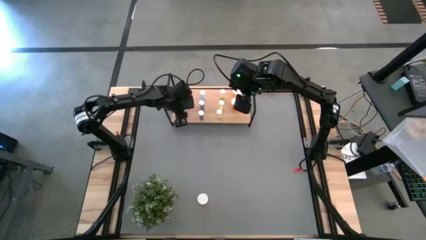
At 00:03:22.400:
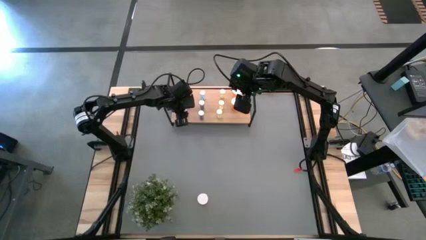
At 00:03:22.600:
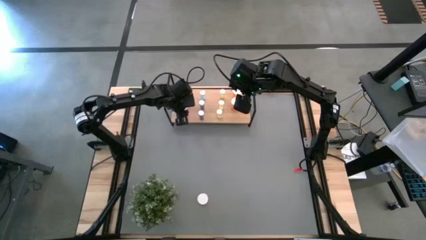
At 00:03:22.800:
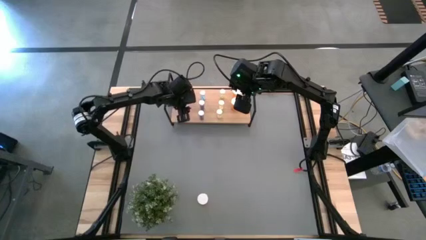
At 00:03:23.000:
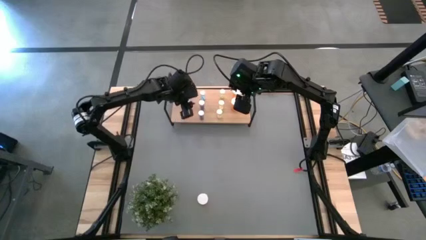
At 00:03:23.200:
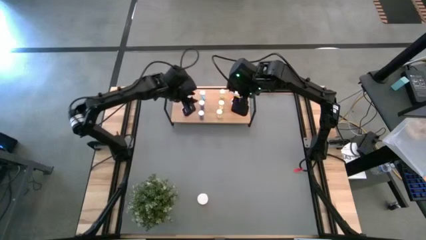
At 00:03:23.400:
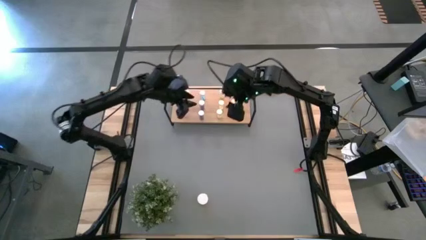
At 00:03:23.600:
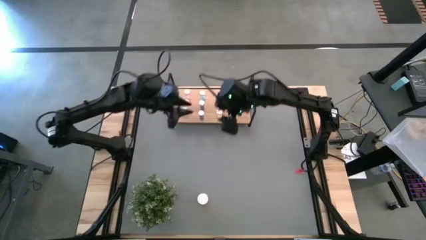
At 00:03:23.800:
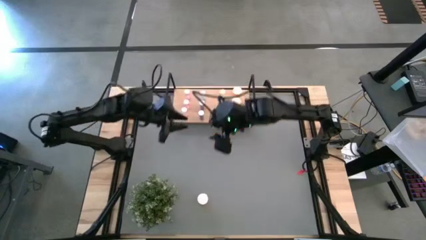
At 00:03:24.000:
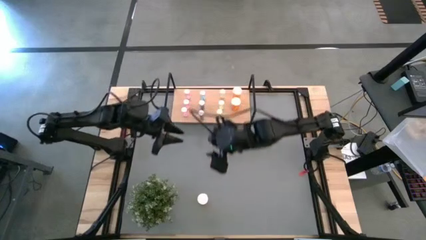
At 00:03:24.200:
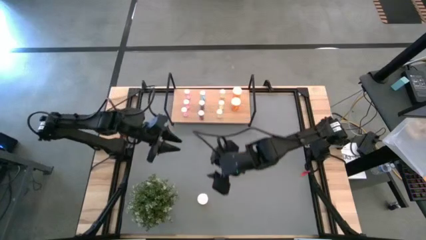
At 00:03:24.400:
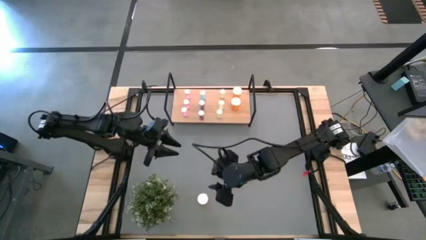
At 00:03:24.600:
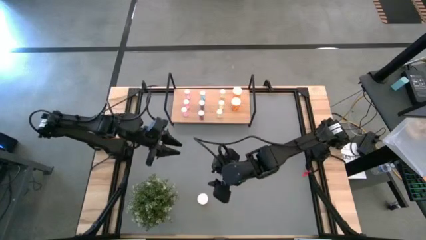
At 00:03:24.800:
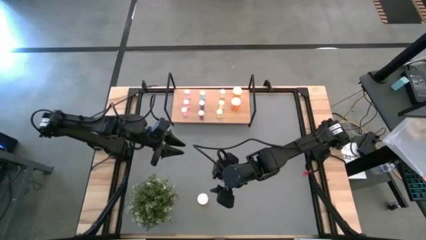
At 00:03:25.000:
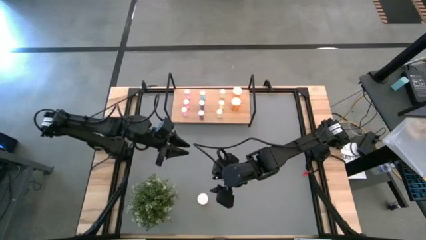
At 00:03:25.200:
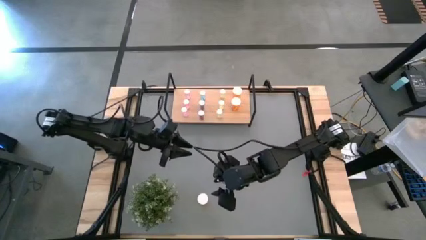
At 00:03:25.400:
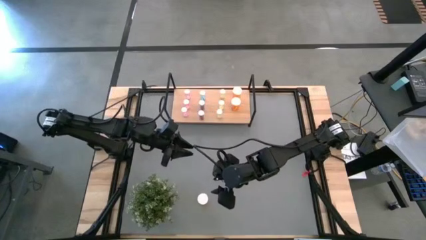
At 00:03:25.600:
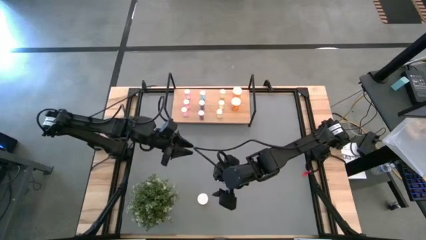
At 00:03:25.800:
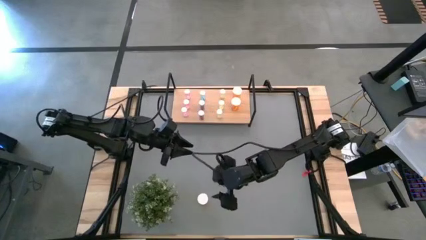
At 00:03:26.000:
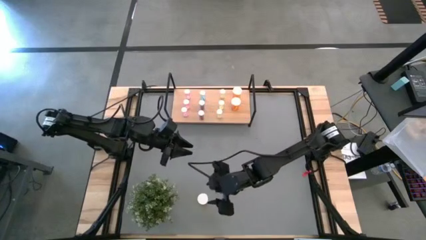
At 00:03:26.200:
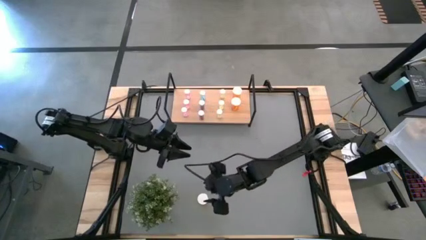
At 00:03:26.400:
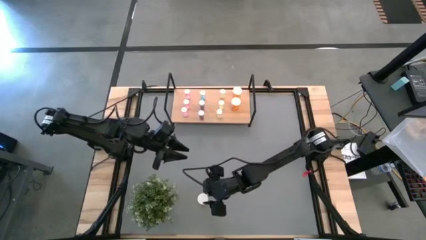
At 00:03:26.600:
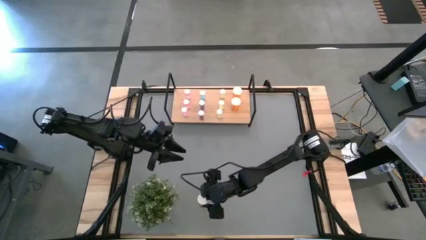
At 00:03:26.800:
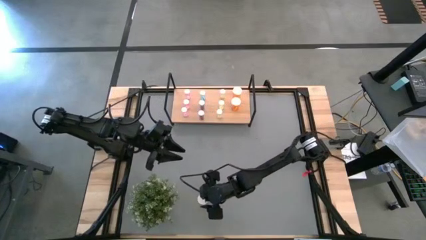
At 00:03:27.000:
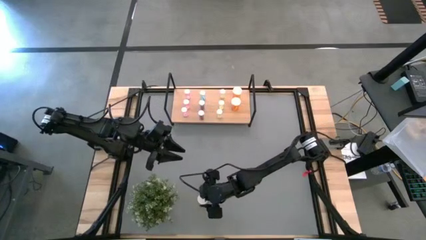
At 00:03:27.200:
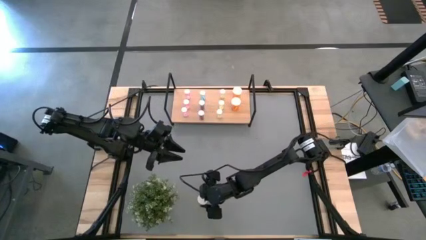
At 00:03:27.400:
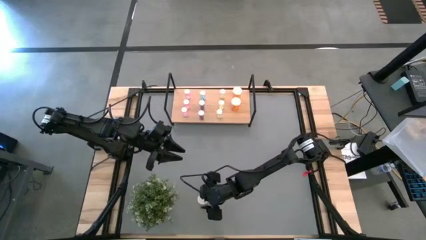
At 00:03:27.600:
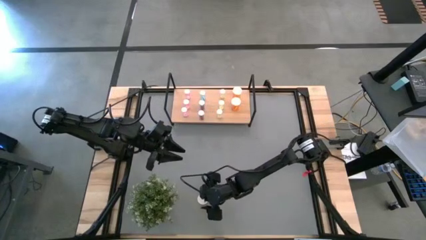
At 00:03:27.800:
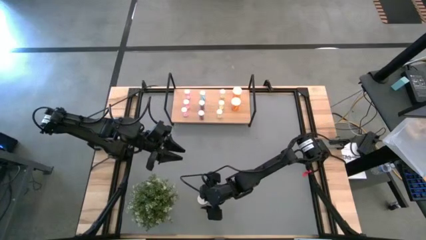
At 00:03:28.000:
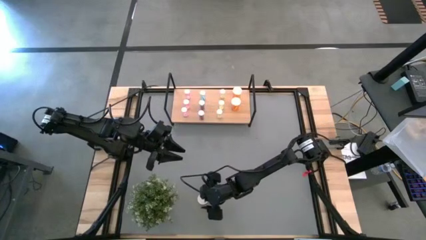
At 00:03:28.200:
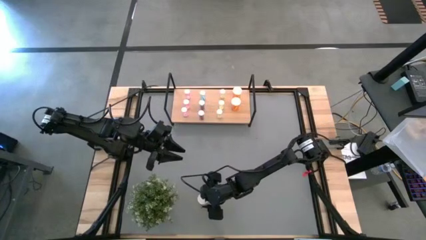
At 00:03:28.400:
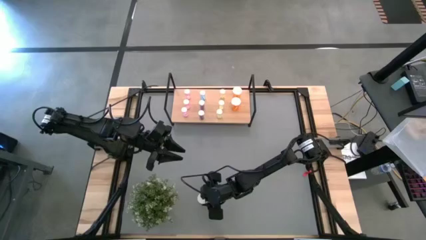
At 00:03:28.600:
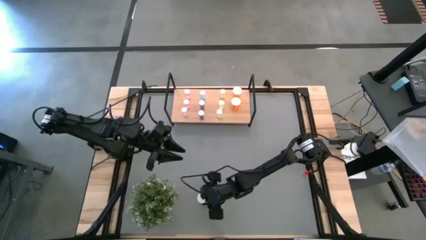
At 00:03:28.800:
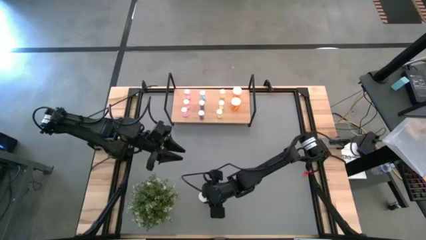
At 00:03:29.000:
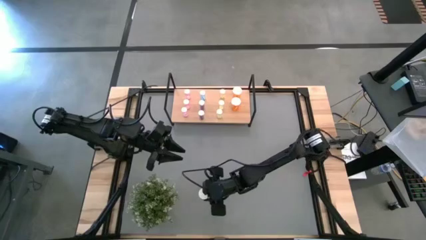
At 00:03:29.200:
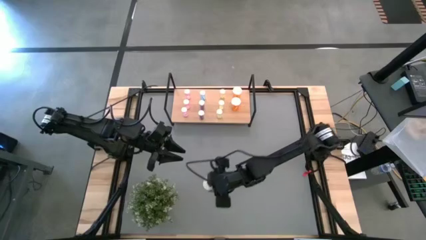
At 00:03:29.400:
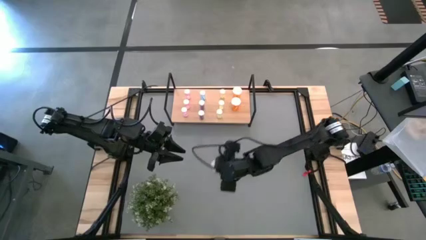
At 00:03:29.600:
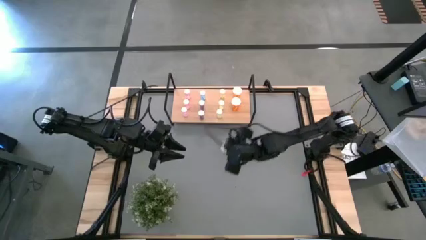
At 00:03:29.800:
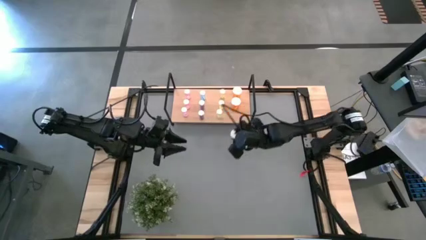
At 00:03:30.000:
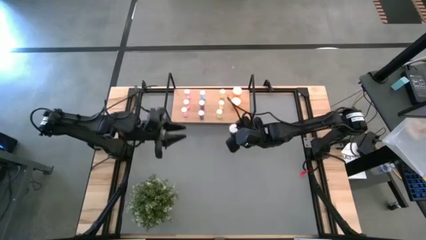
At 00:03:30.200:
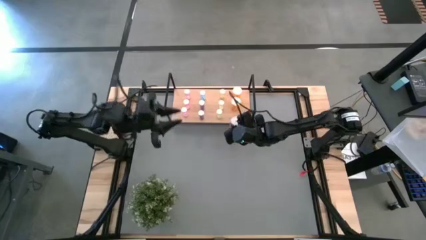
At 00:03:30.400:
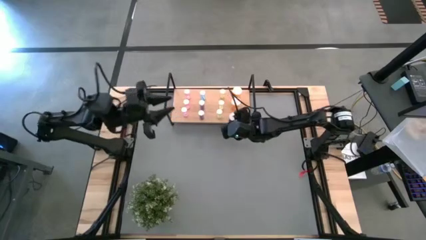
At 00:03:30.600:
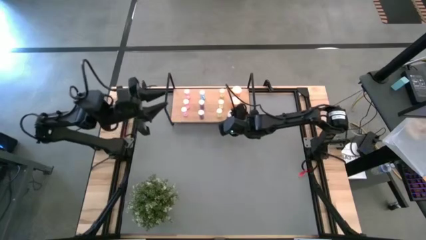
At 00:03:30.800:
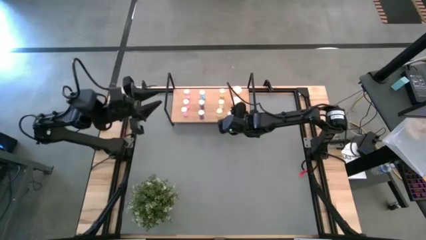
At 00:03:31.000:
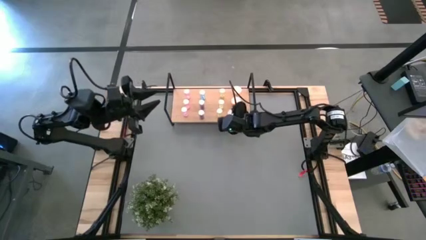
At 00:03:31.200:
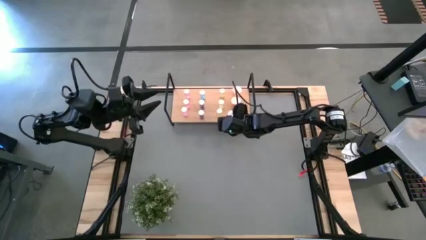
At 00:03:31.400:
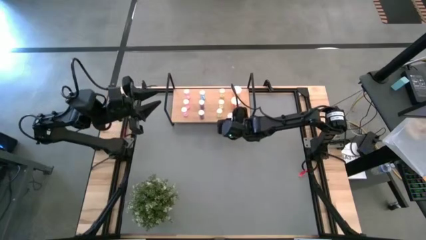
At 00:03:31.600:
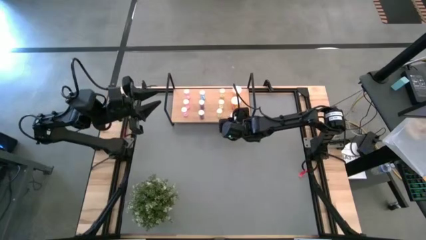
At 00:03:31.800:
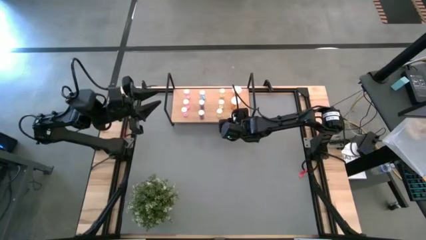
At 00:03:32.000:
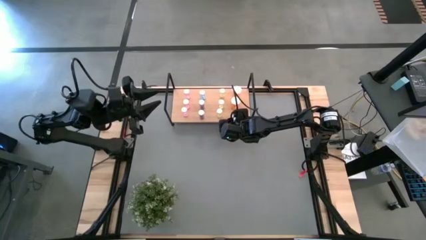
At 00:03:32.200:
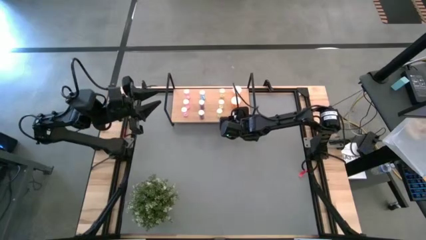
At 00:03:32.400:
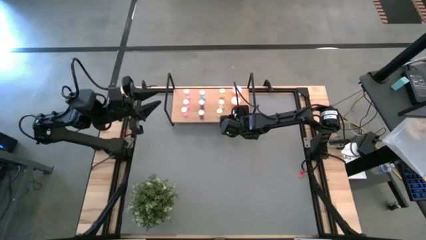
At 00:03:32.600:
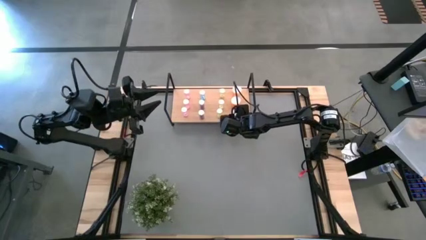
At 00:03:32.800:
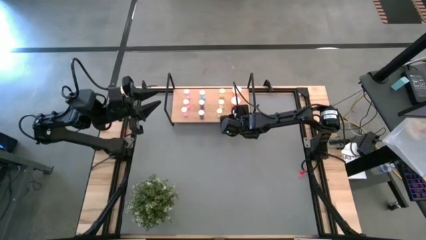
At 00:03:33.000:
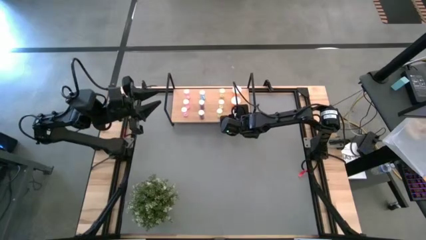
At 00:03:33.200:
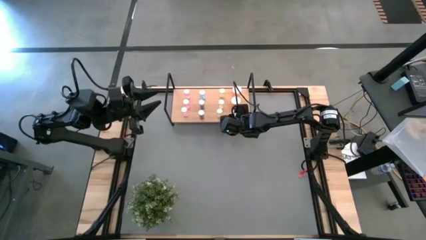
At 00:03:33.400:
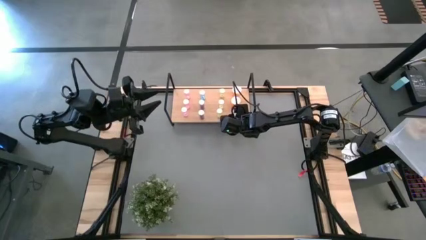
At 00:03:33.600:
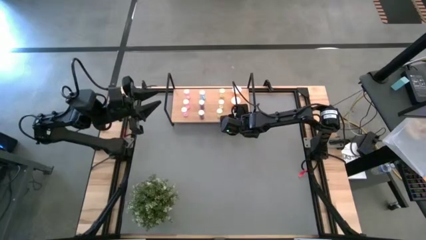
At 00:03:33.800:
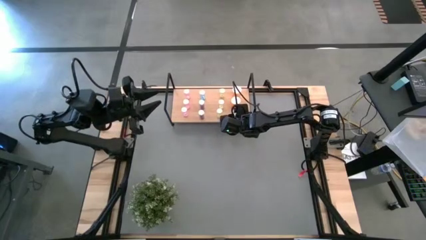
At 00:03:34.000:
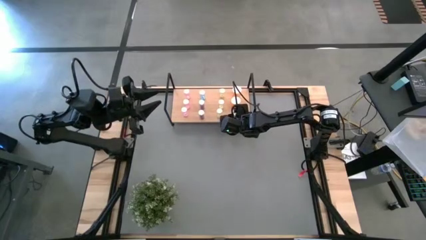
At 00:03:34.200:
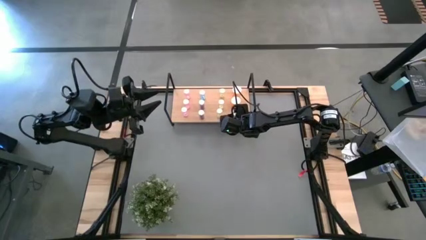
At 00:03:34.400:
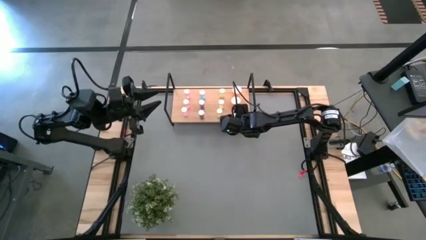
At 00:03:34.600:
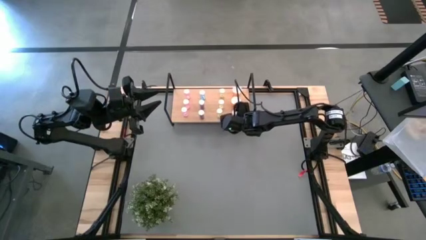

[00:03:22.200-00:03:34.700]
Task: Pick and place medicine bottles onto shelf by color
Put the orange pill bottle on the shelf aligned with the other orange pill bottles
